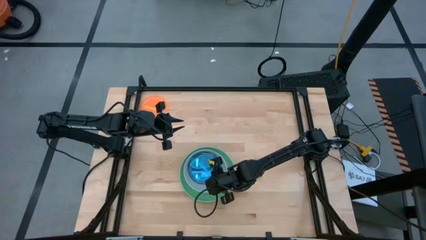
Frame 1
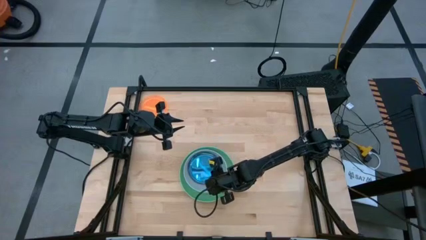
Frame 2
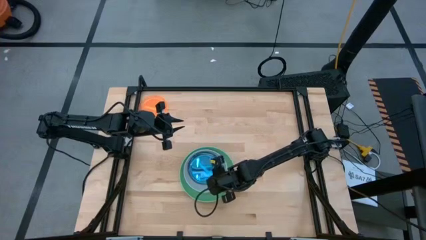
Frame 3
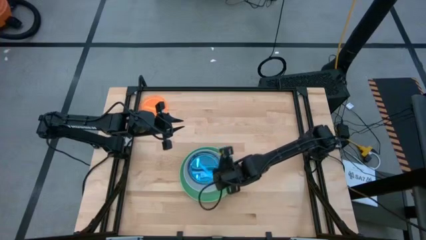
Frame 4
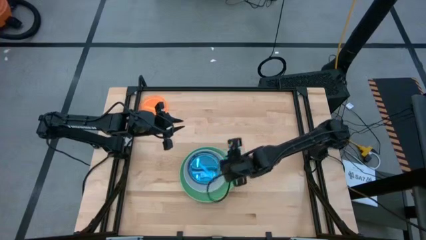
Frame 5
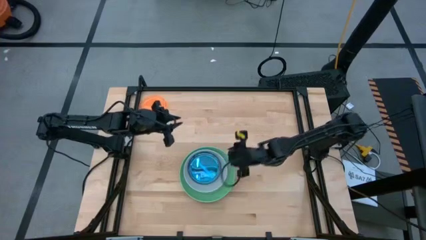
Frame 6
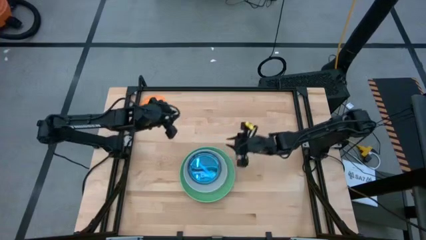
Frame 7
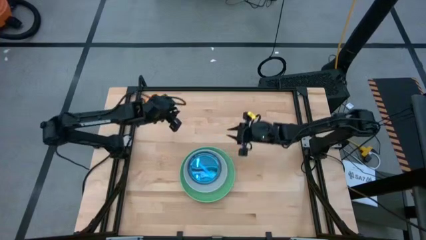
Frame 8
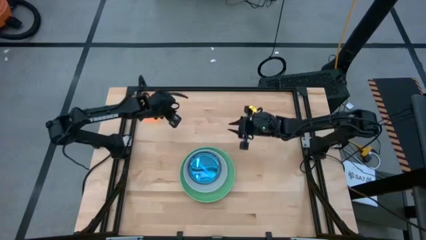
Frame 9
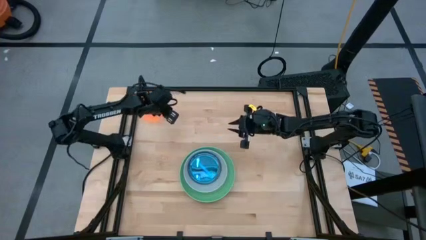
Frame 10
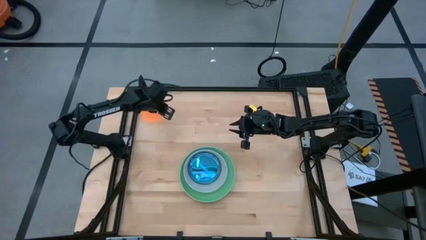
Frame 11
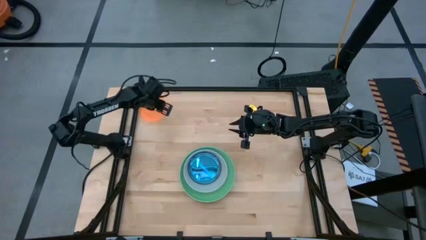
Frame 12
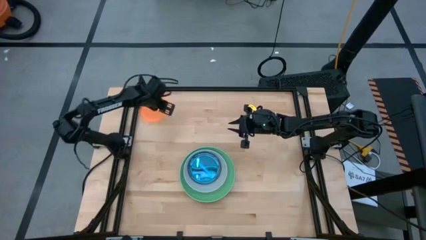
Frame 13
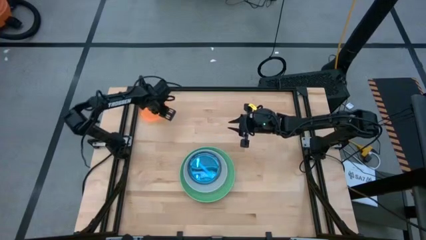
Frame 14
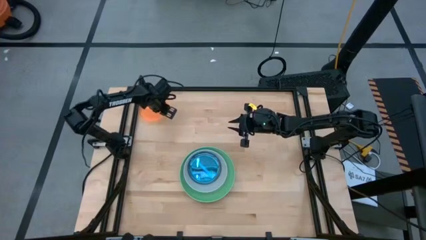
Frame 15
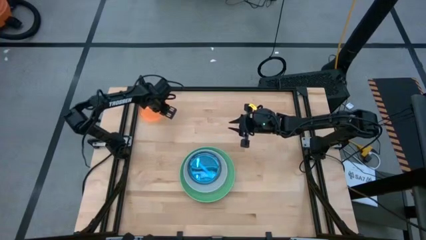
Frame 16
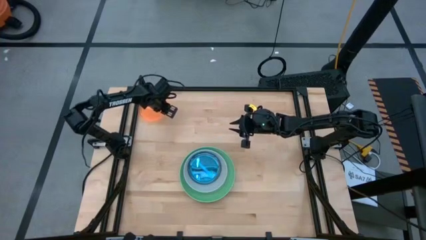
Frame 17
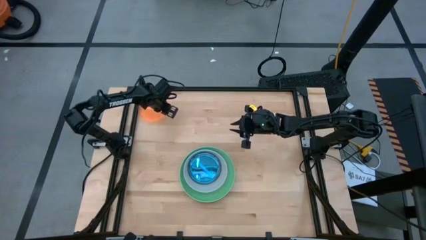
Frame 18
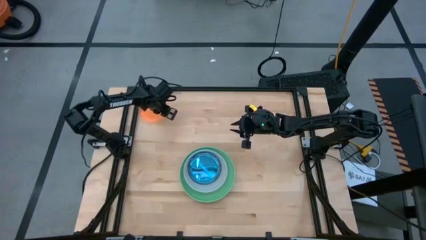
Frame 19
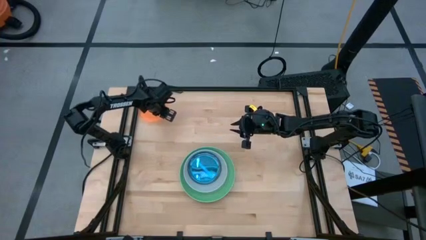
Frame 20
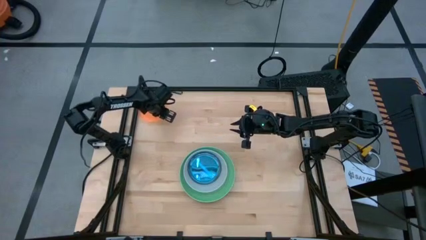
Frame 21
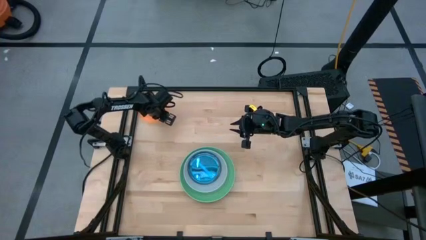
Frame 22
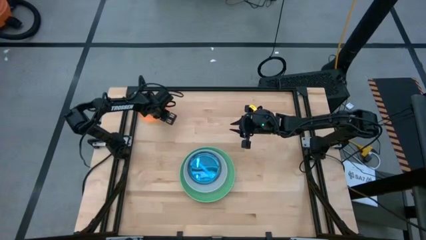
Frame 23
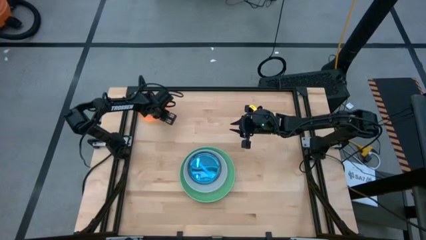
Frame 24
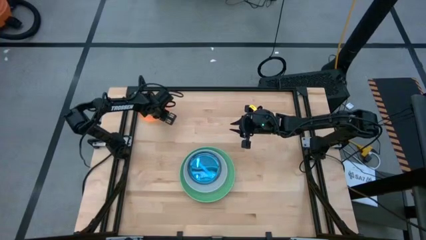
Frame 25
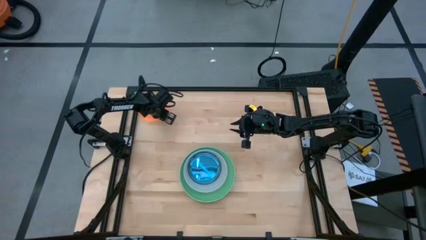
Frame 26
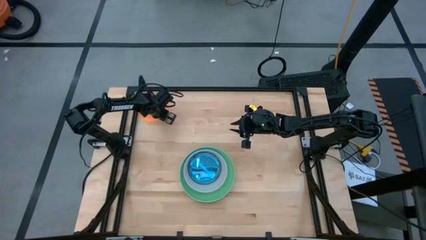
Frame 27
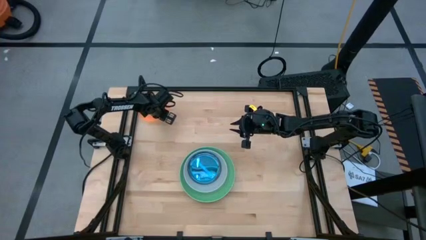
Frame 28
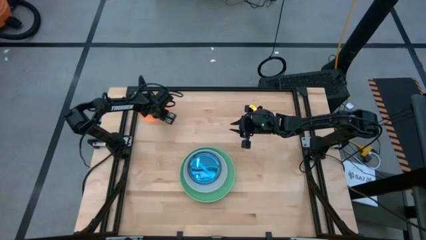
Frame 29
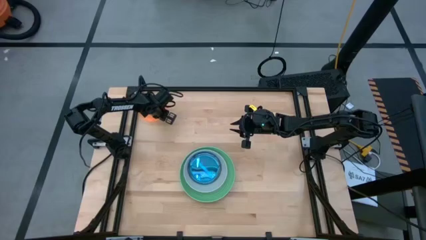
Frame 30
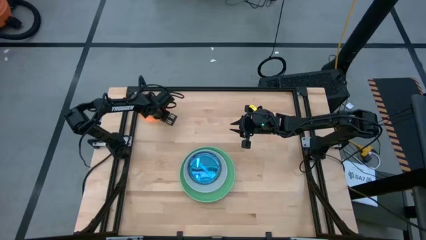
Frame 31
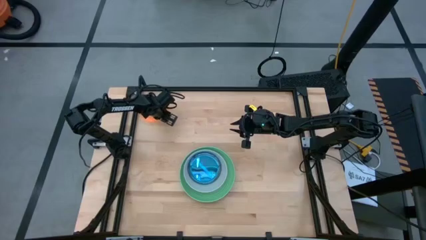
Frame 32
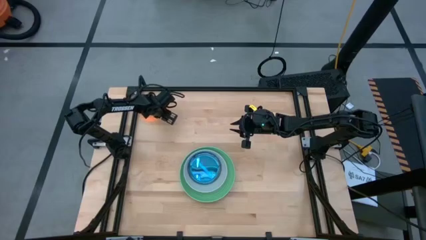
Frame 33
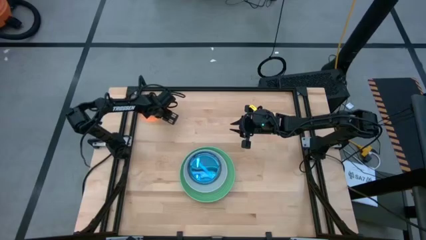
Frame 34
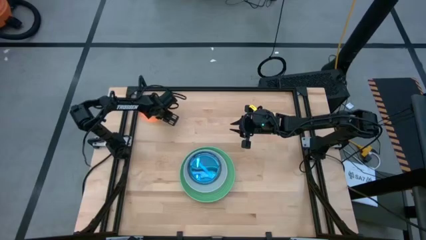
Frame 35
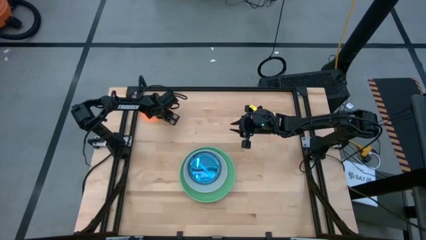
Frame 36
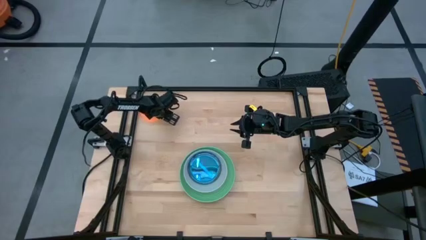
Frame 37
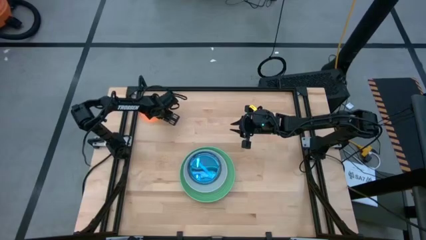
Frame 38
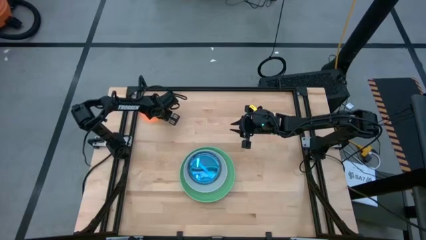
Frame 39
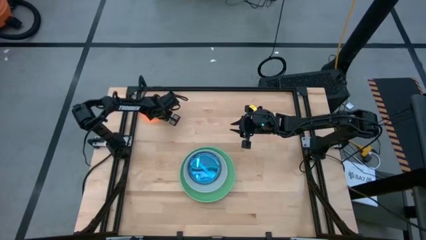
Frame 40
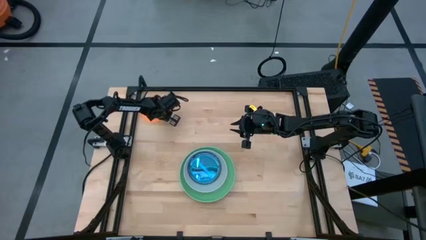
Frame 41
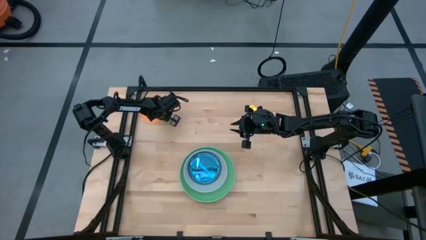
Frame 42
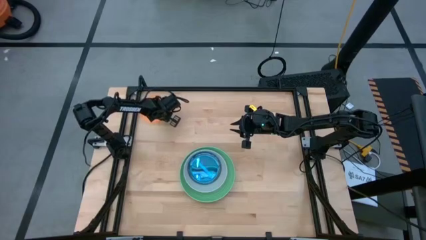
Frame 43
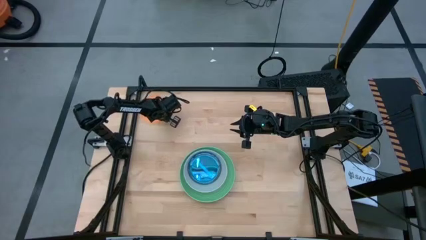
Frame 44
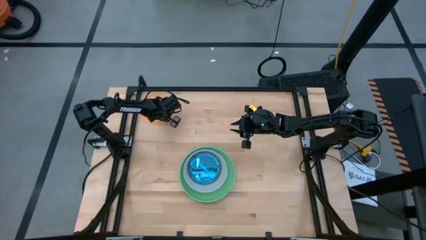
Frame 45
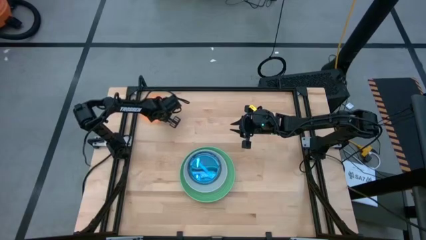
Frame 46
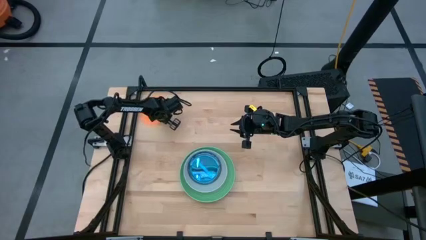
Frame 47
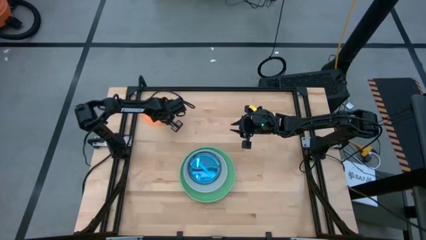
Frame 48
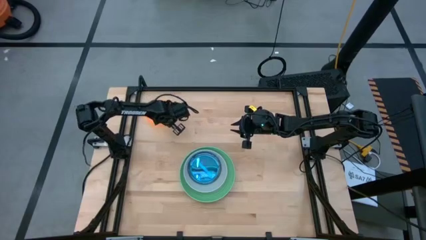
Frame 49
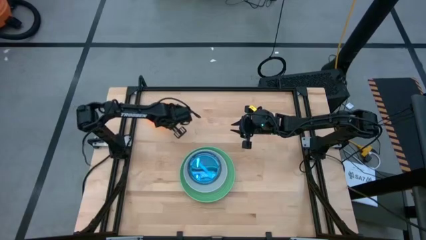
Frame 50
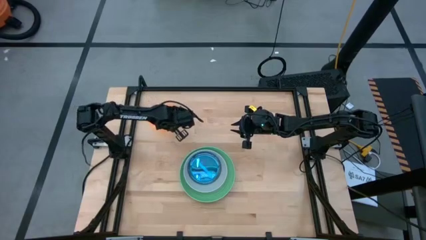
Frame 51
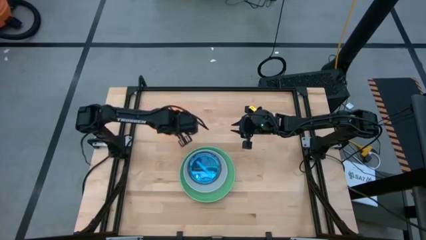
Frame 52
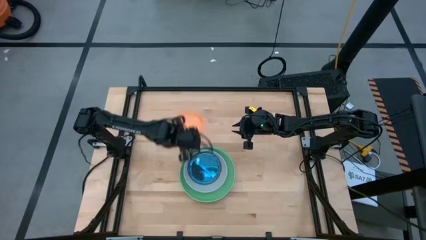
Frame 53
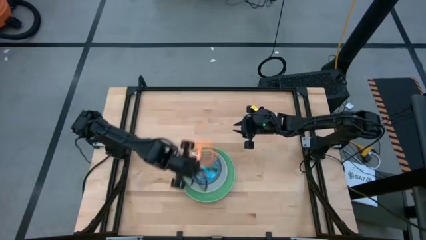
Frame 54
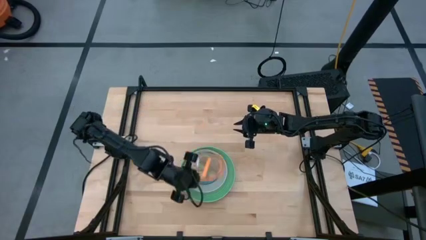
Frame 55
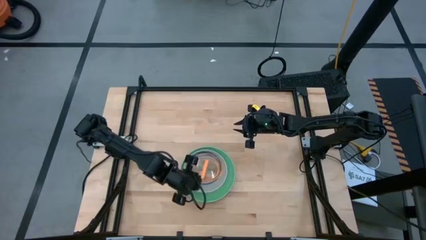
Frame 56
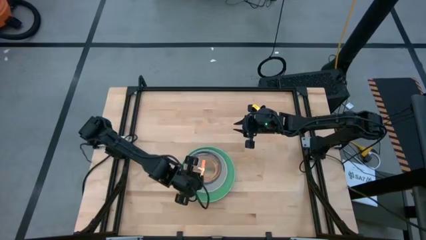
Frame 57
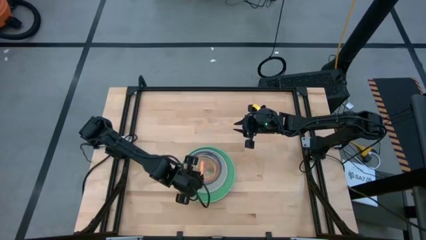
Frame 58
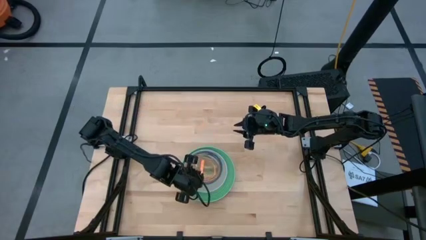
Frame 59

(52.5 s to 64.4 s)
Task: Stack plastic plates
Stack the small orange plate on the small blue plate

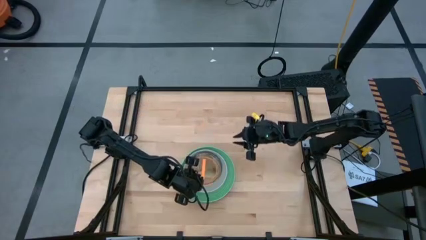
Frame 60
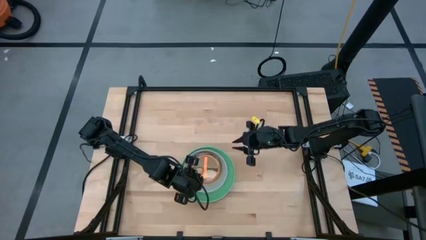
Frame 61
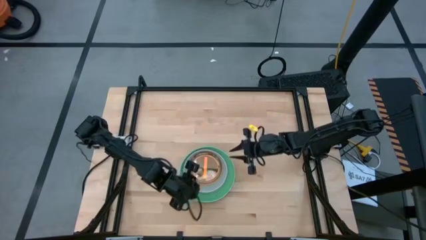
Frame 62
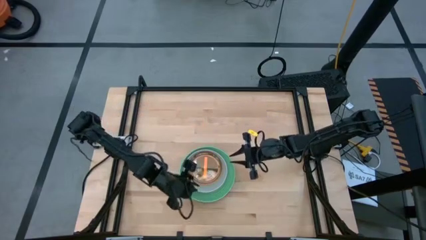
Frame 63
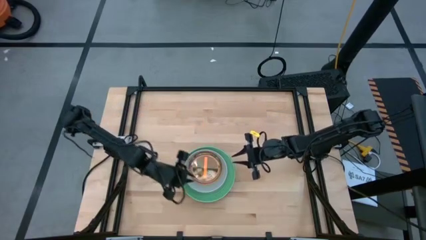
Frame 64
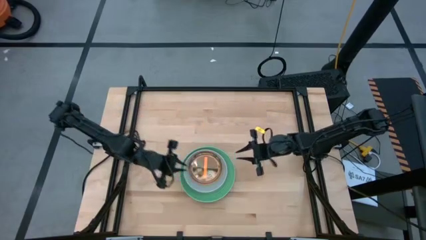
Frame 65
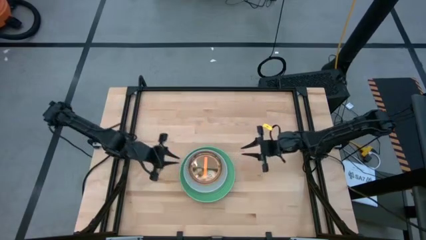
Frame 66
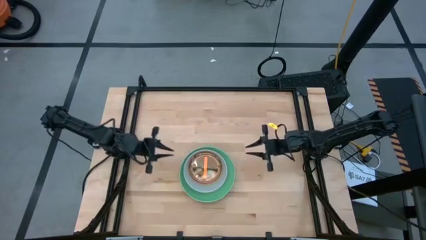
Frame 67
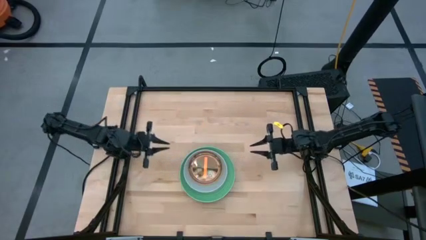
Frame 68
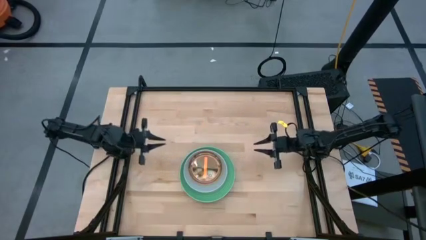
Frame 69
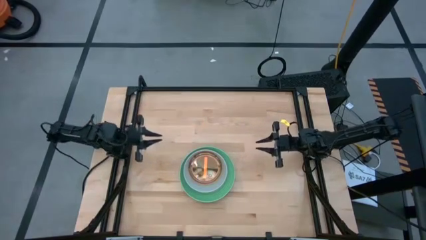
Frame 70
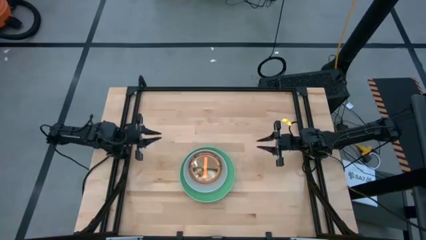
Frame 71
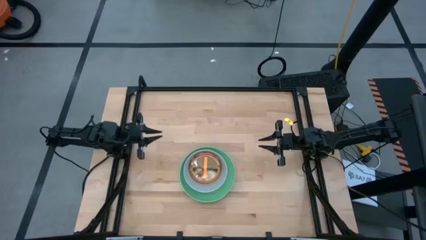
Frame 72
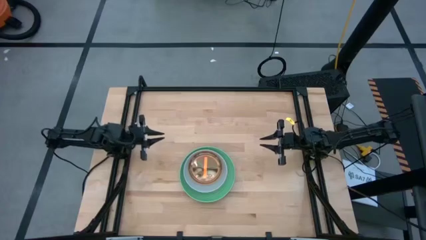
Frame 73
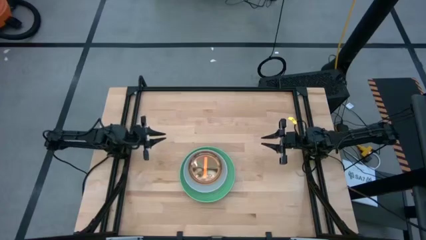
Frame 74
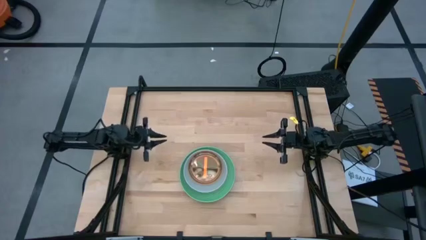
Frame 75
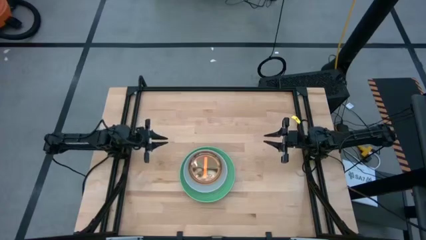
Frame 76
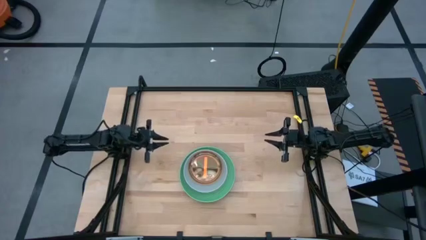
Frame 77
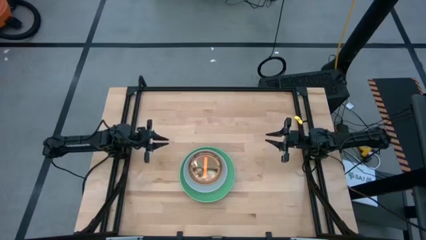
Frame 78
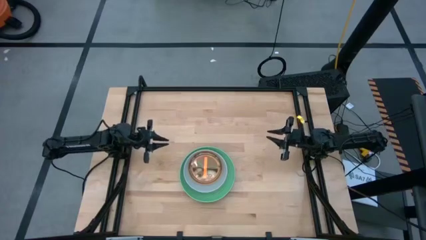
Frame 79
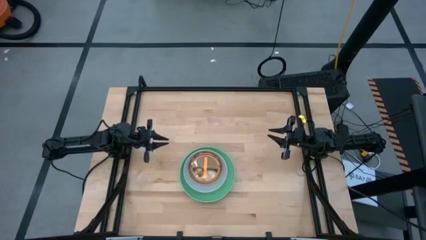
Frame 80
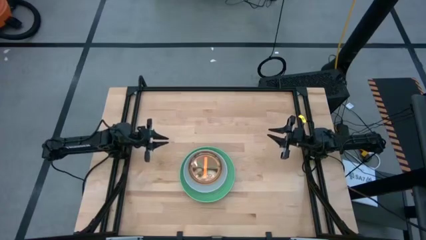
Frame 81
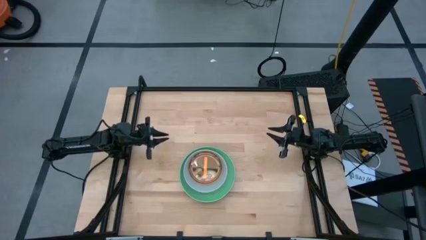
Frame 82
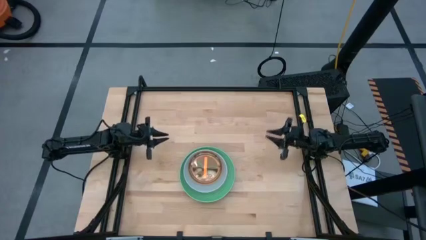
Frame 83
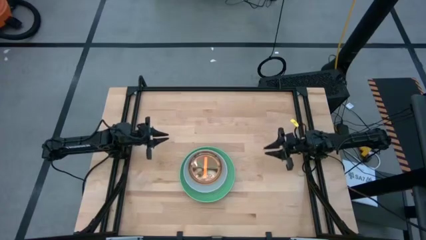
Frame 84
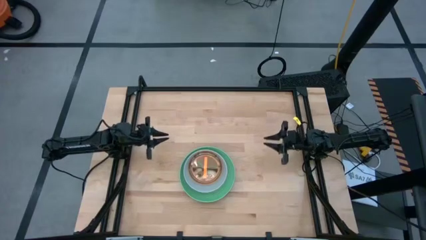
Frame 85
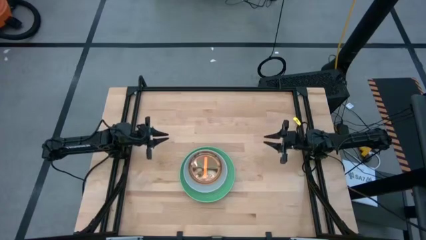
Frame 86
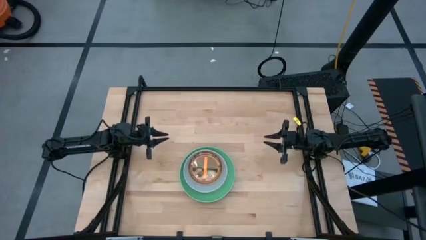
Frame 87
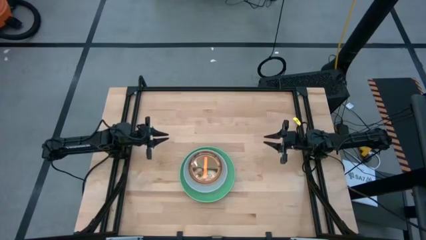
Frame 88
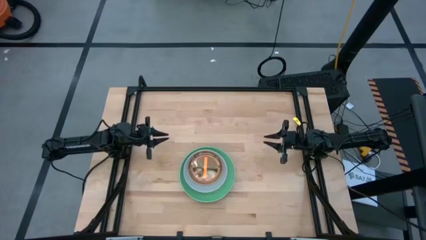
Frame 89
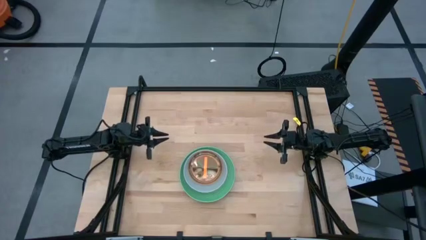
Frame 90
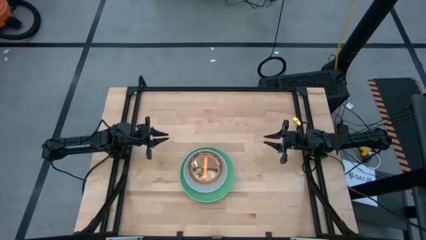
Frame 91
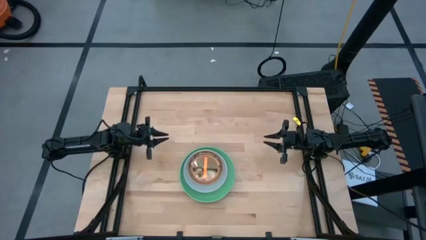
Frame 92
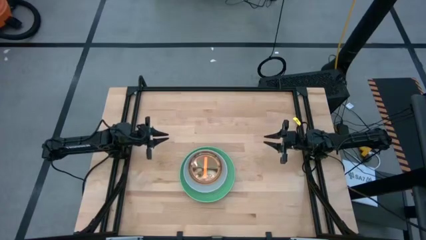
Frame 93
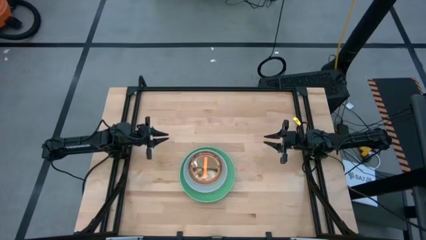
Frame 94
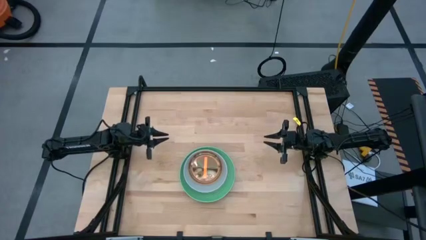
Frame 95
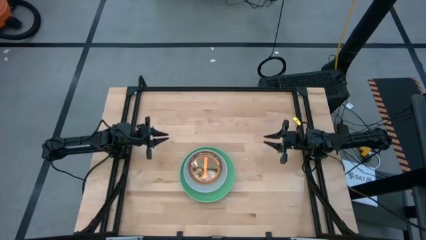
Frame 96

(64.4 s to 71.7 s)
Return to Home Position
